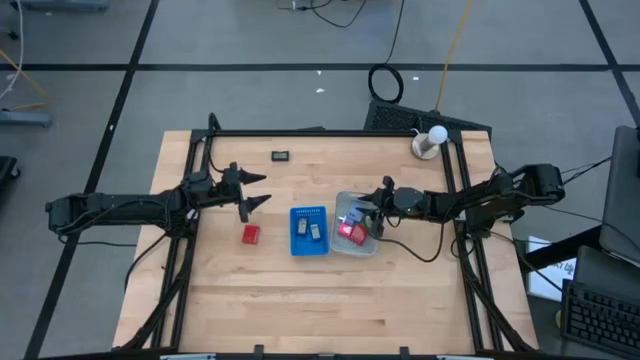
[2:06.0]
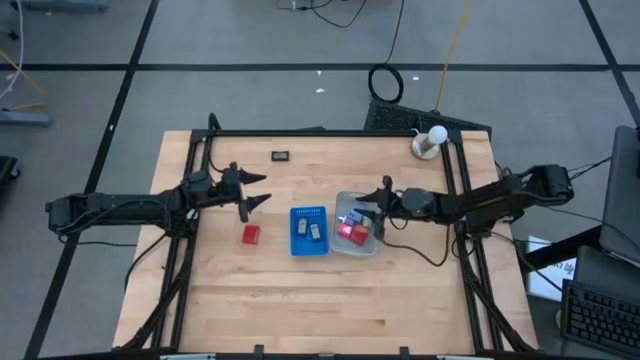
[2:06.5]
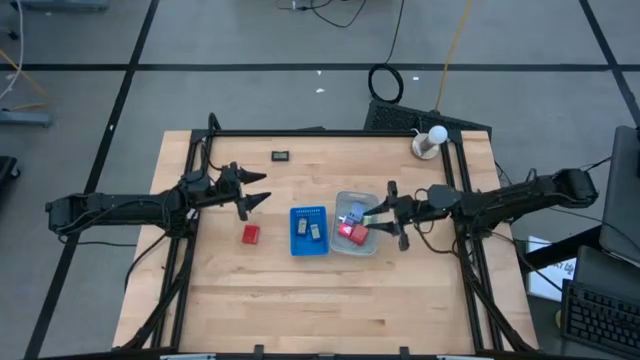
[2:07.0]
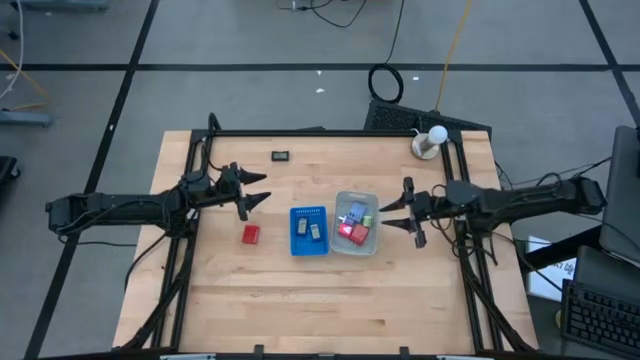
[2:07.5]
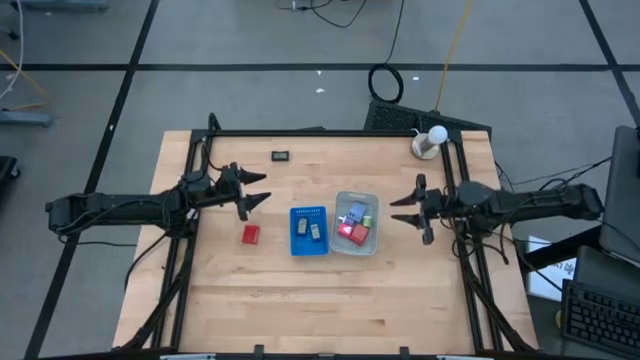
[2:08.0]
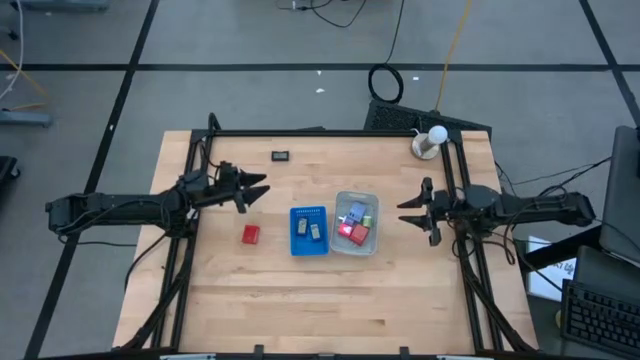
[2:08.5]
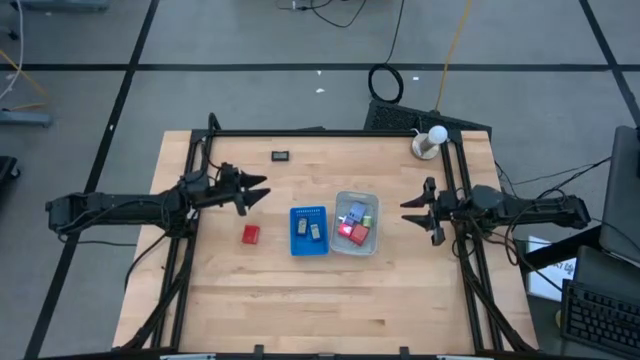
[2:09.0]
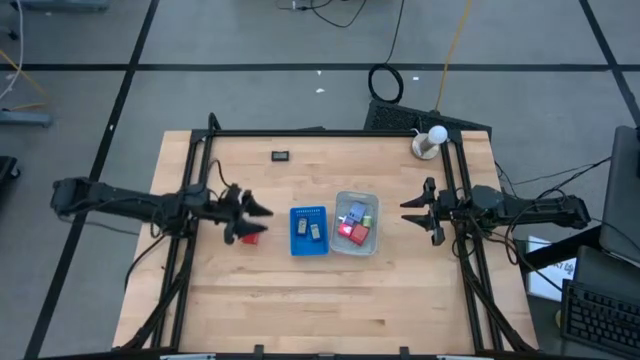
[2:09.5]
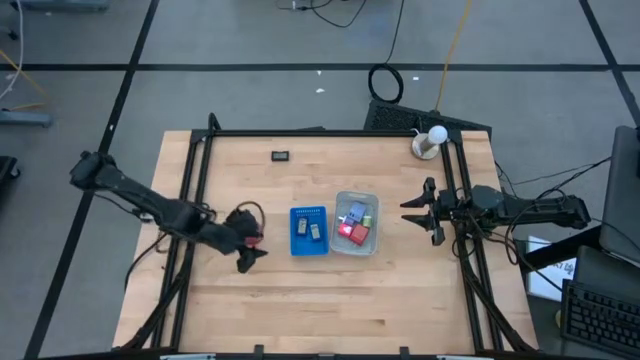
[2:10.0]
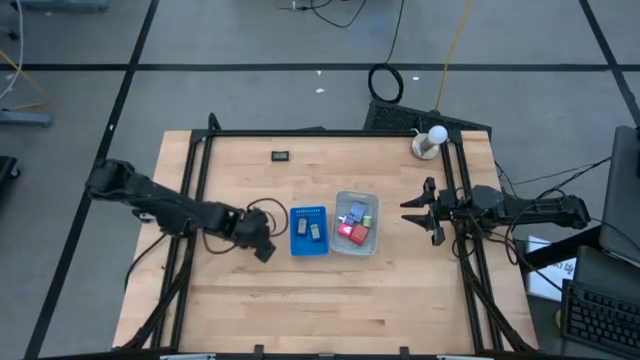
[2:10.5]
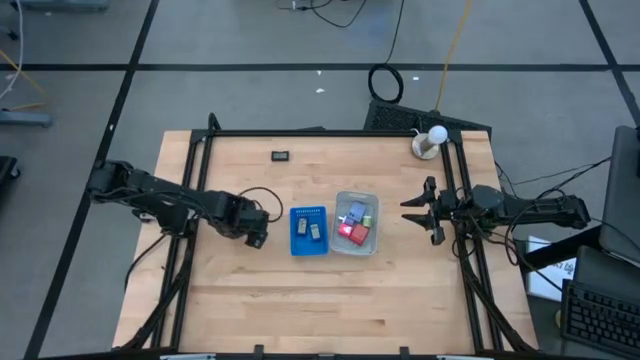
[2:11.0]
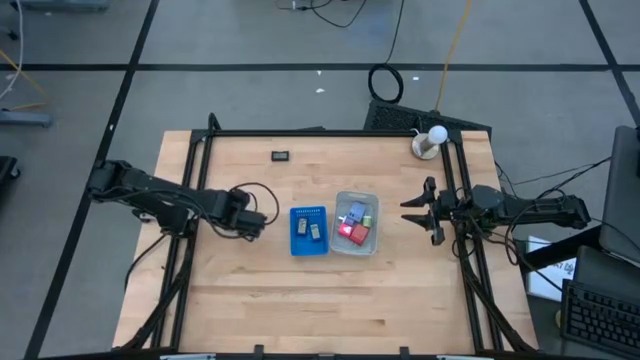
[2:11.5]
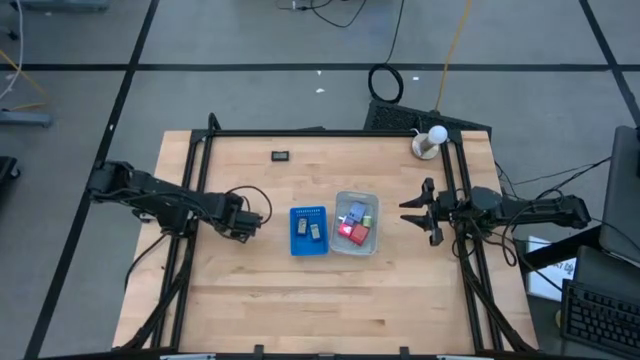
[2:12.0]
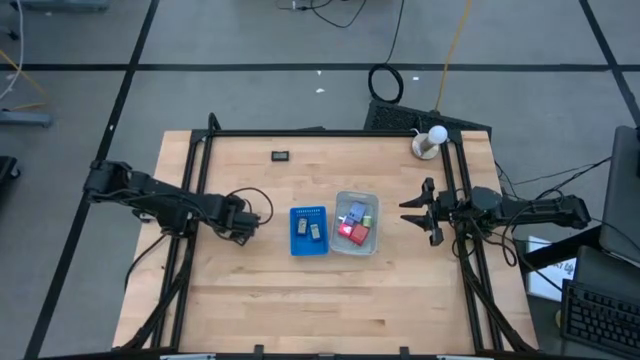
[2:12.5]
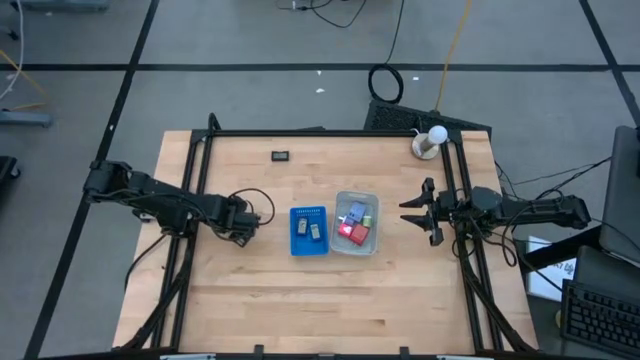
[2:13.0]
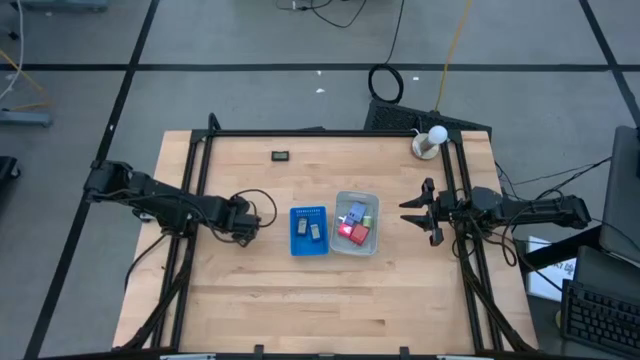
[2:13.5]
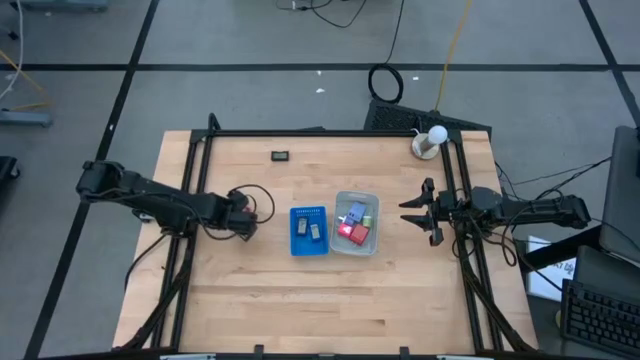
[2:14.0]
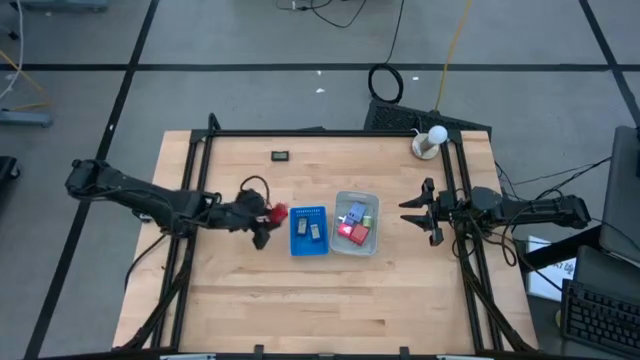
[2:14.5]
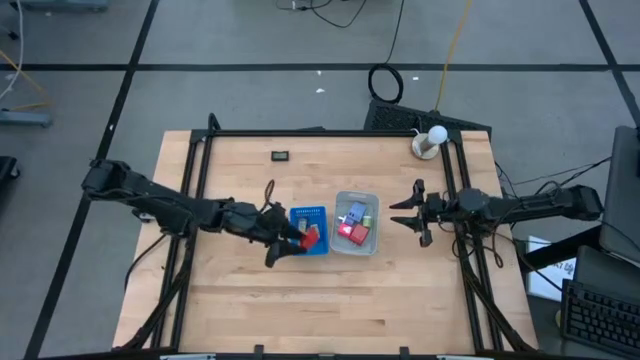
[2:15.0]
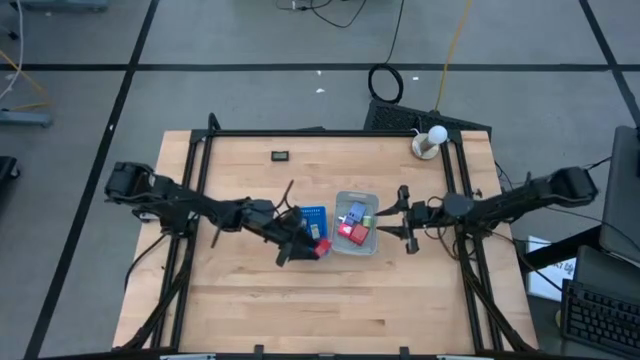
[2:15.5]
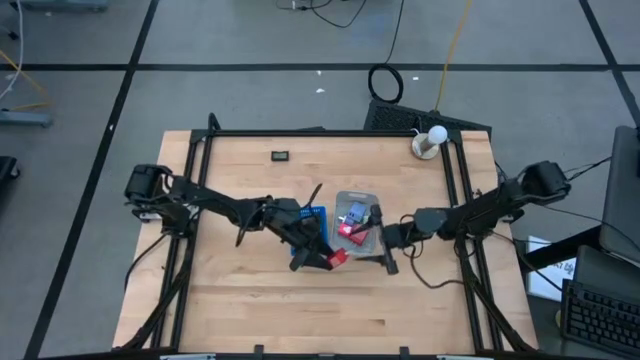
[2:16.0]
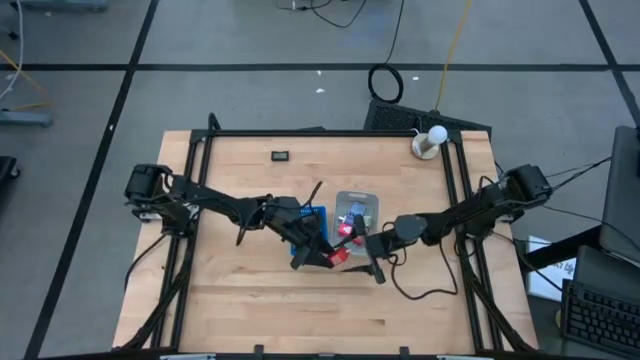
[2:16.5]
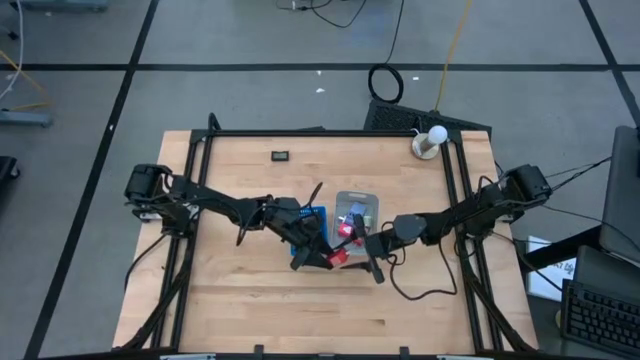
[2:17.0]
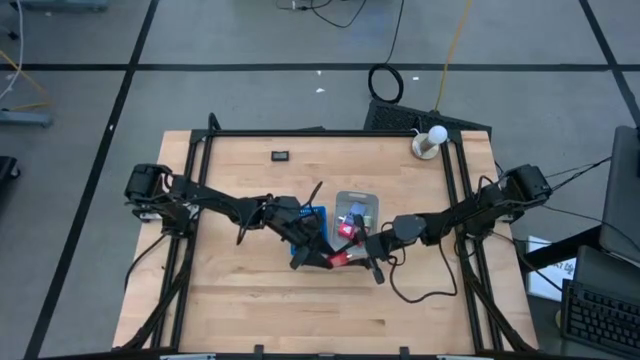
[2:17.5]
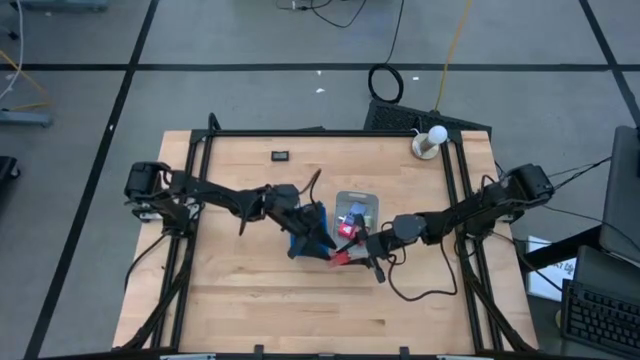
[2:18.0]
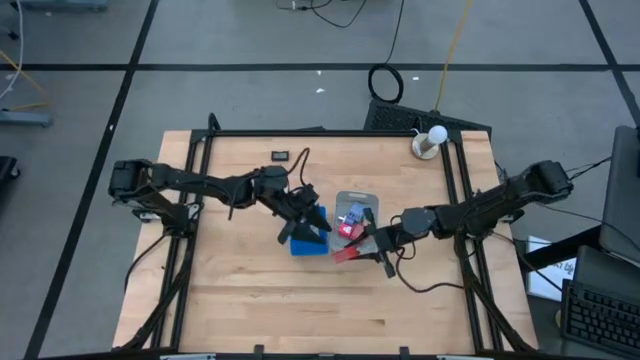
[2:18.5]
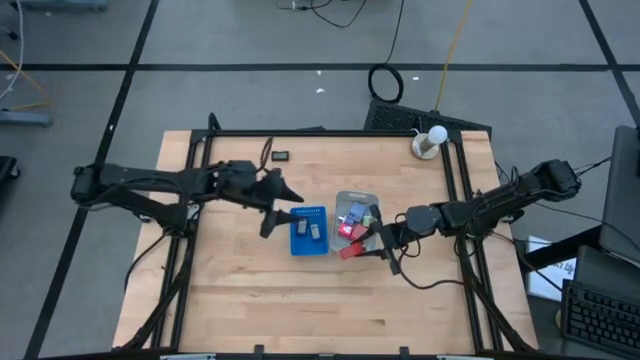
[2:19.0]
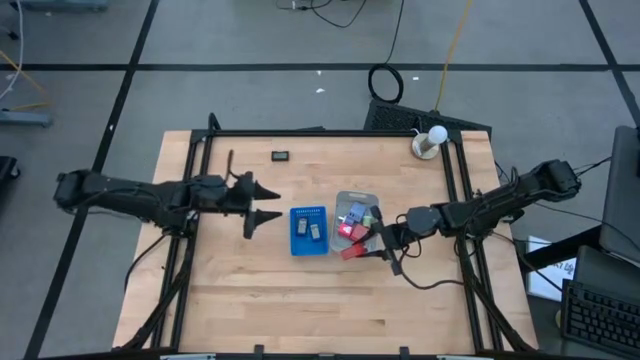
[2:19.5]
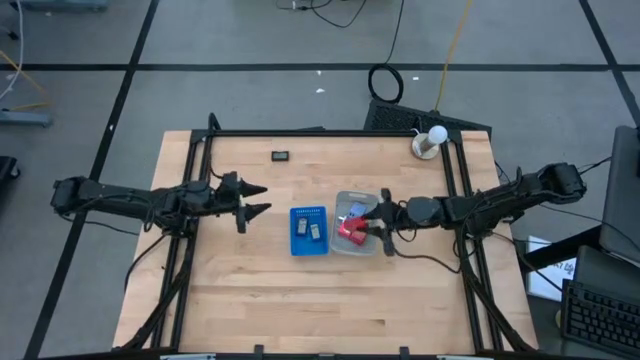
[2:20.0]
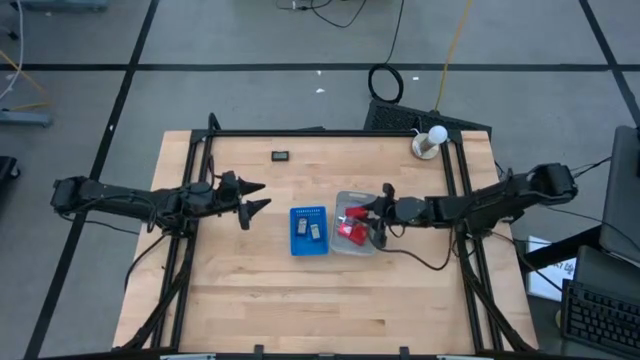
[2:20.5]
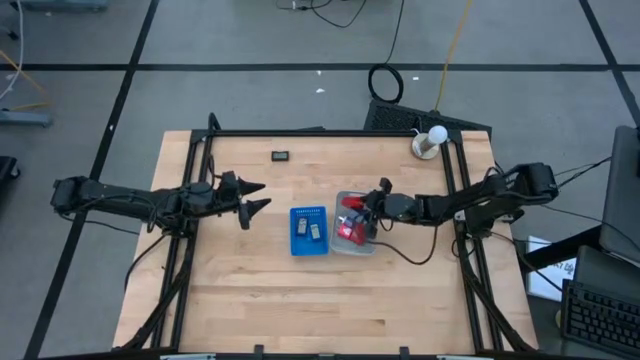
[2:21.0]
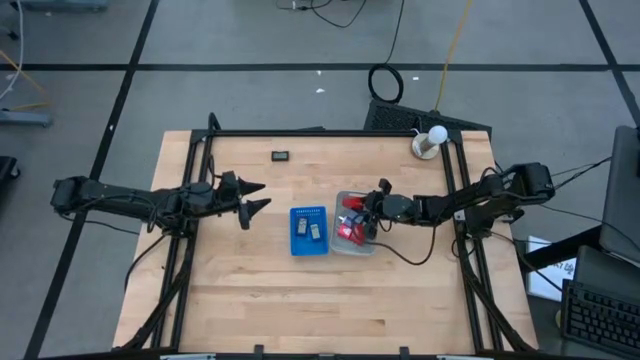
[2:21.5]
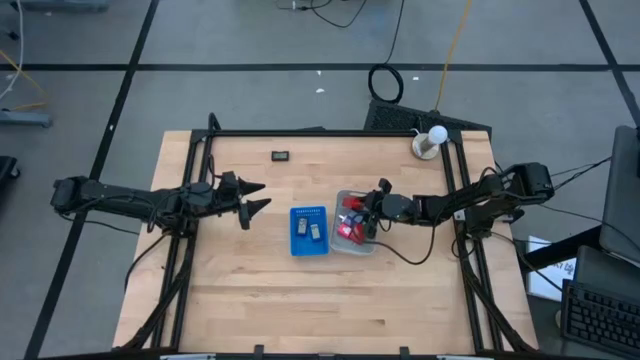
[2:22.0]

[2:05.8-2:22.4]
Task: Pick & Place Office items
Put the red charger adapter into the gray bin

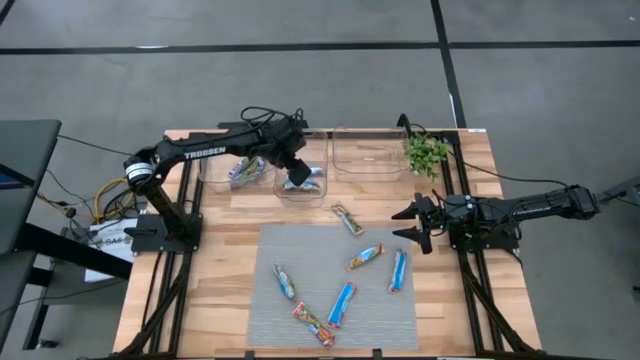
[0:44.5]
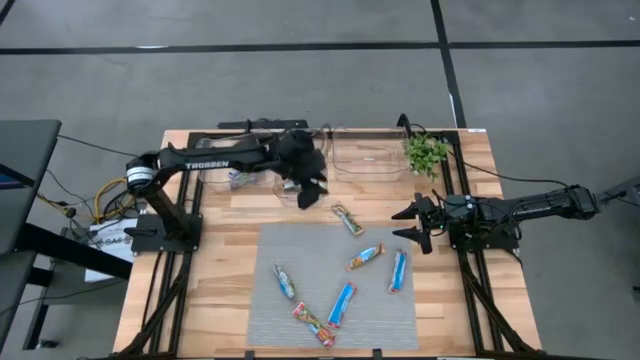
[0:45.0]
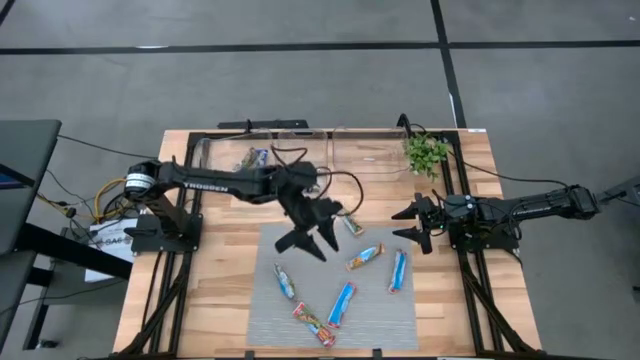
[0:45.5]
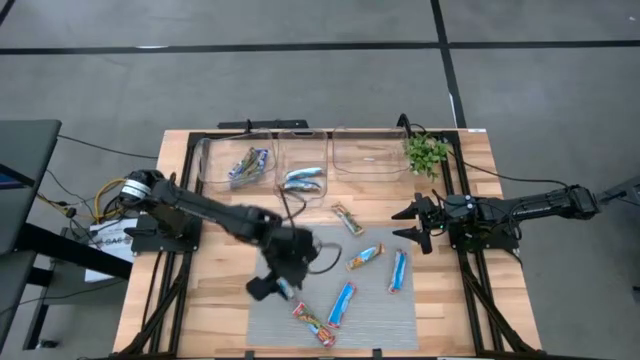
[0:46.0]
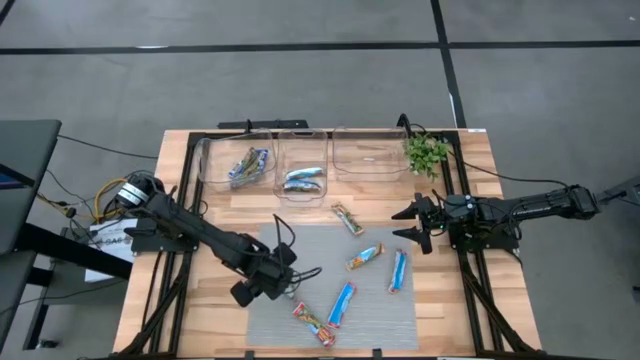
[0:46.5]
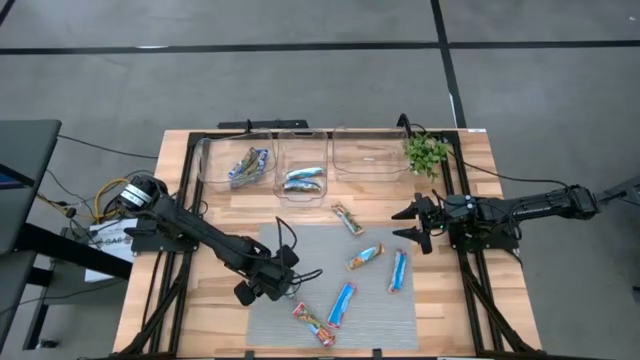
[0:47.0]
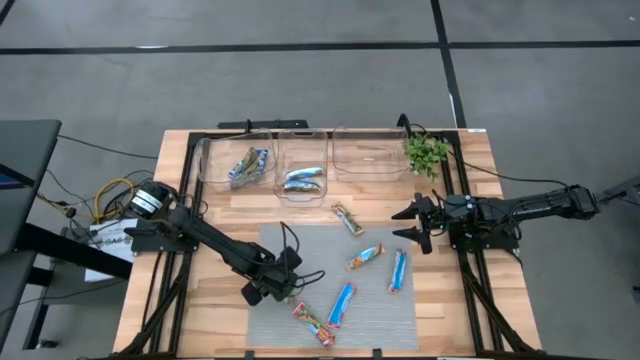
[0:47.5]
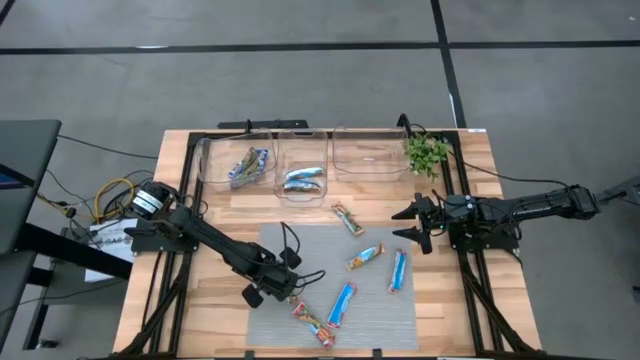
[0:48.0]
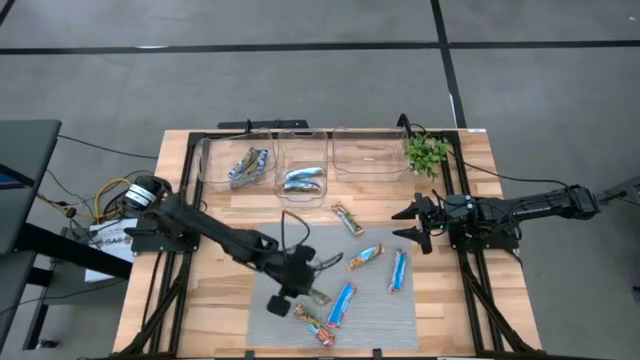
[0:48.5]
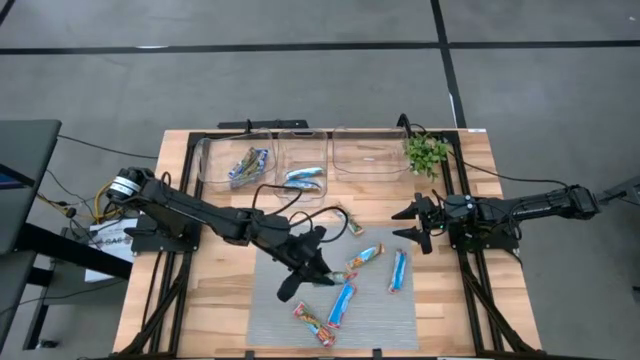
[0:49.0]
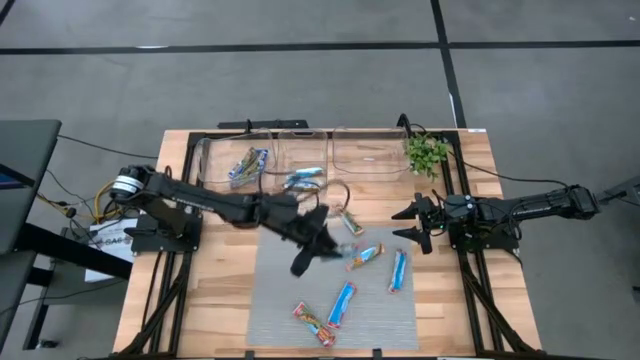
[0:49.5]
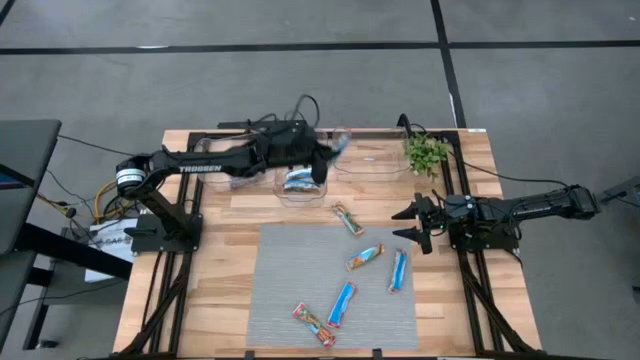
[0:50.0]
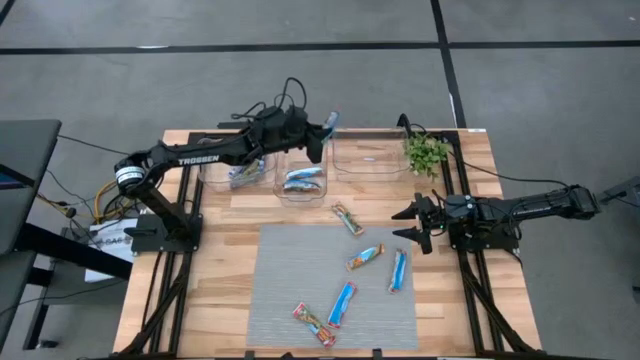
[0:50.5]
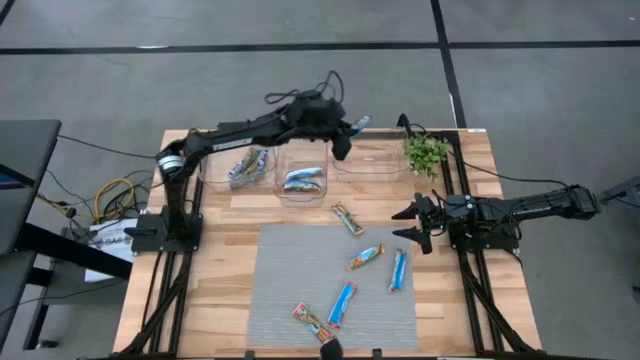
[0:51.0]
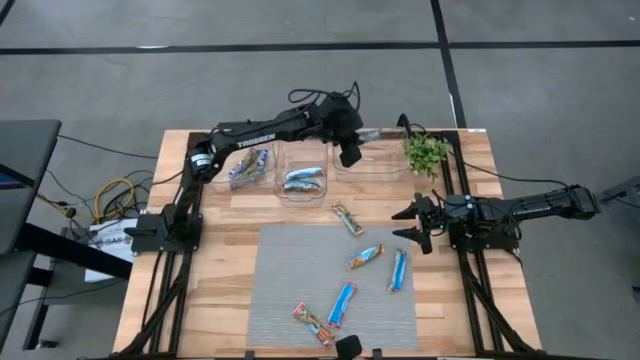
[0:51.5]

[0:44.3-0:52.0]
Task: Pick and place Granola Bars by type
Put the red granola bar into the right transparent bin
